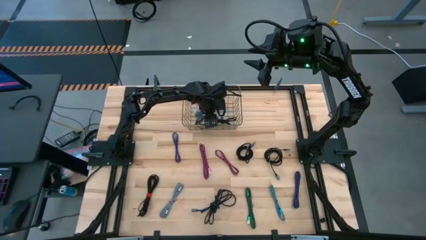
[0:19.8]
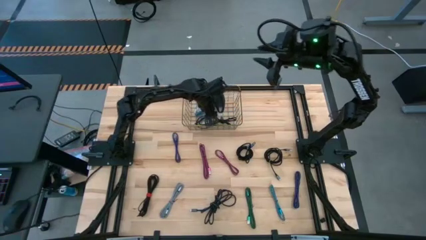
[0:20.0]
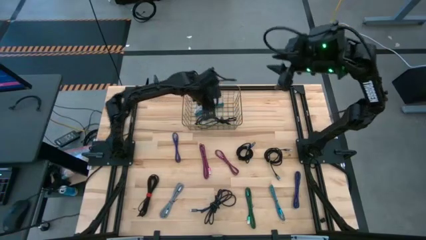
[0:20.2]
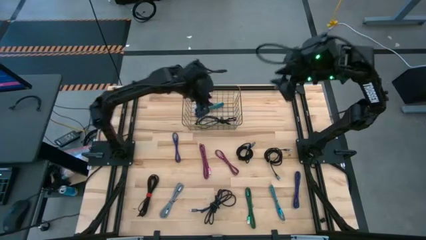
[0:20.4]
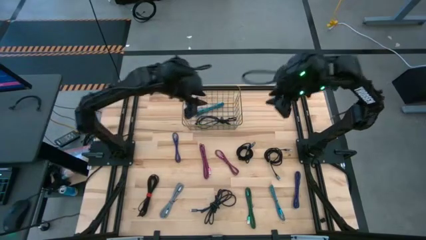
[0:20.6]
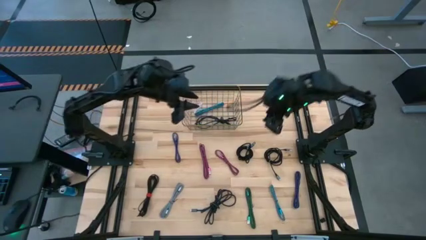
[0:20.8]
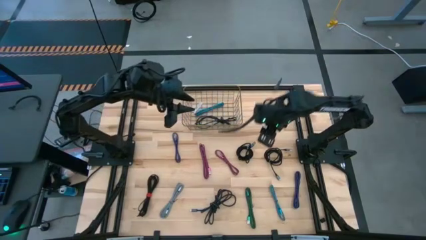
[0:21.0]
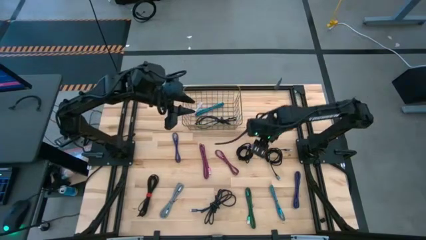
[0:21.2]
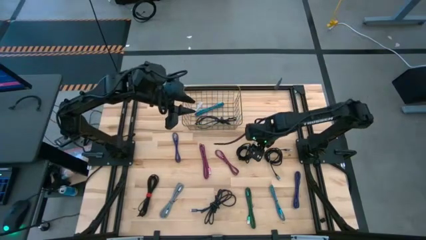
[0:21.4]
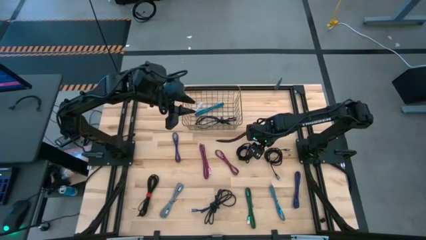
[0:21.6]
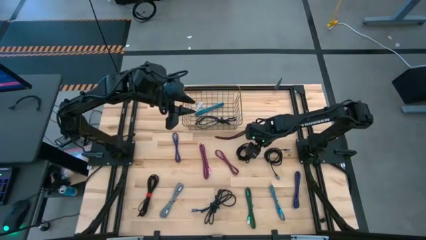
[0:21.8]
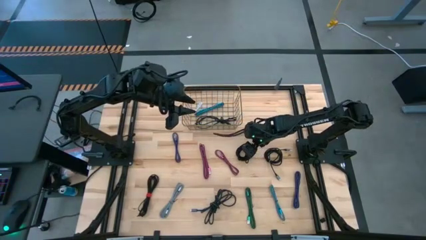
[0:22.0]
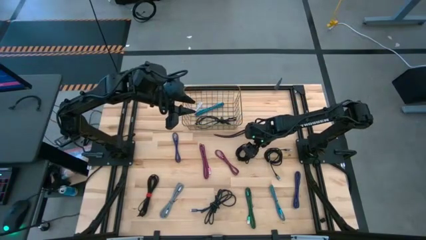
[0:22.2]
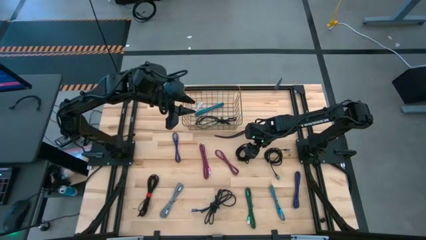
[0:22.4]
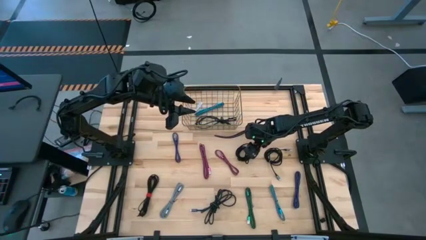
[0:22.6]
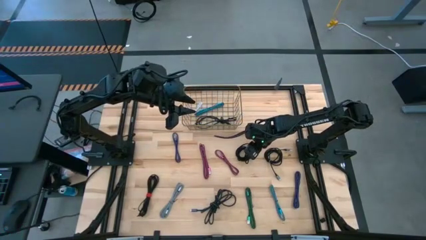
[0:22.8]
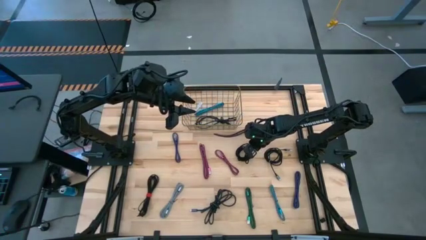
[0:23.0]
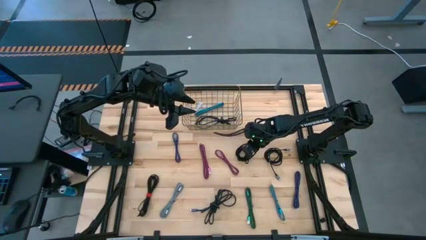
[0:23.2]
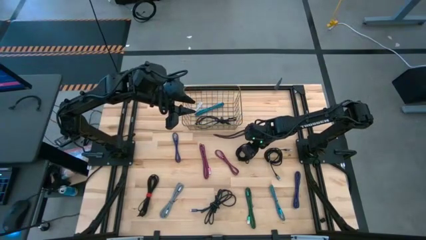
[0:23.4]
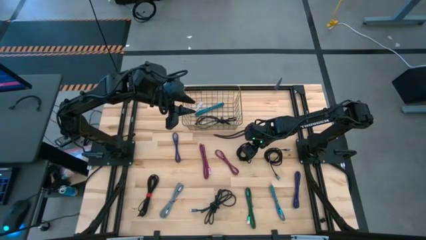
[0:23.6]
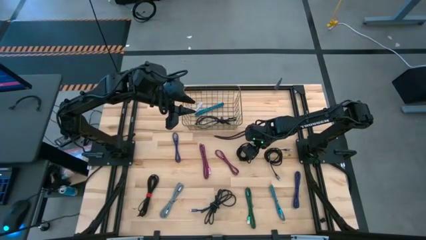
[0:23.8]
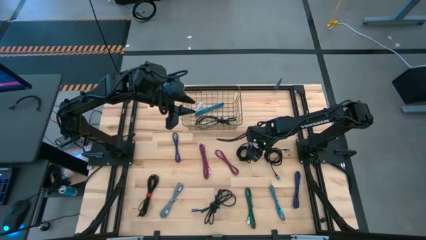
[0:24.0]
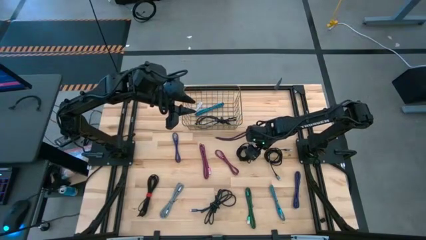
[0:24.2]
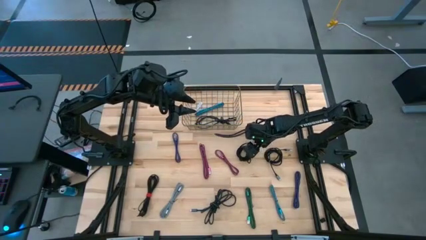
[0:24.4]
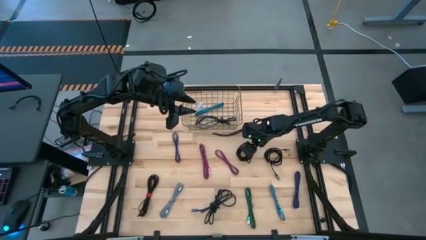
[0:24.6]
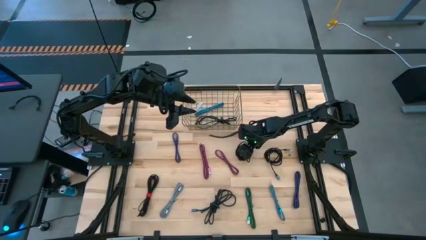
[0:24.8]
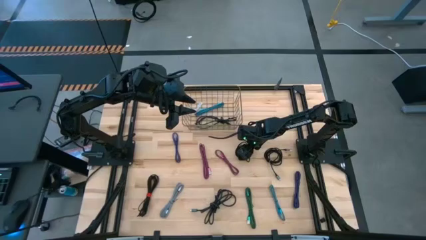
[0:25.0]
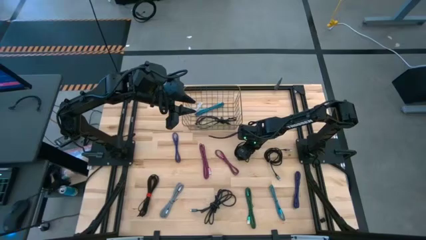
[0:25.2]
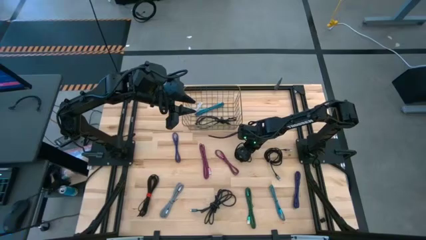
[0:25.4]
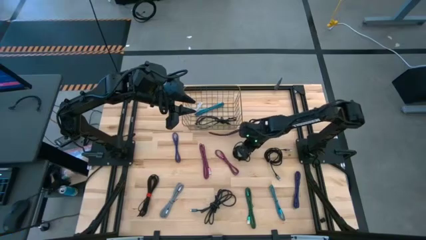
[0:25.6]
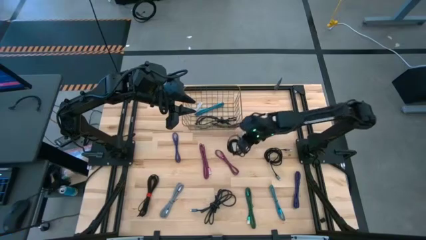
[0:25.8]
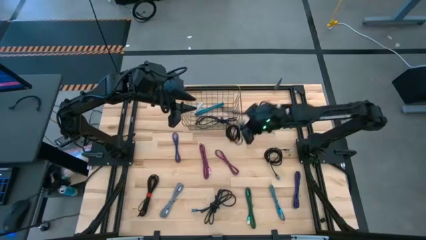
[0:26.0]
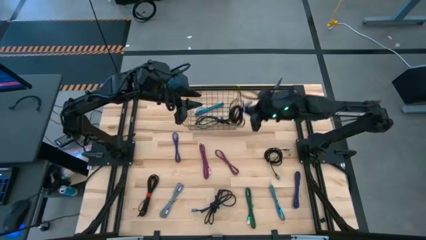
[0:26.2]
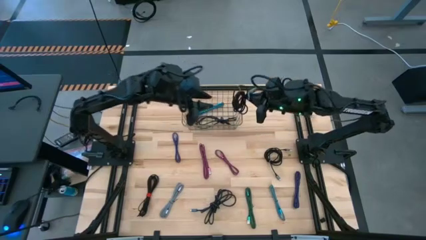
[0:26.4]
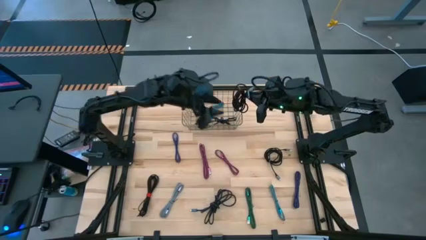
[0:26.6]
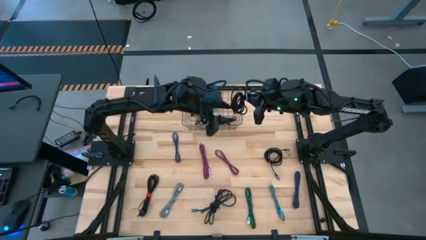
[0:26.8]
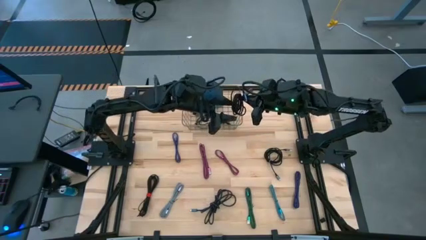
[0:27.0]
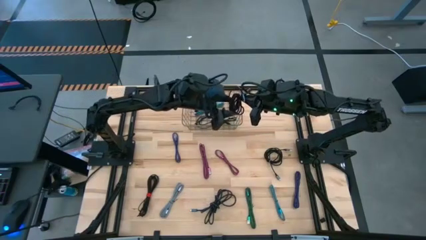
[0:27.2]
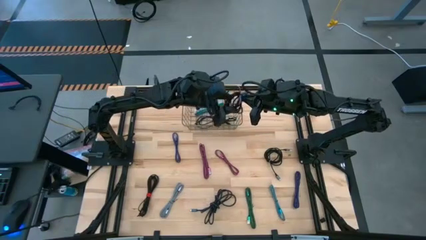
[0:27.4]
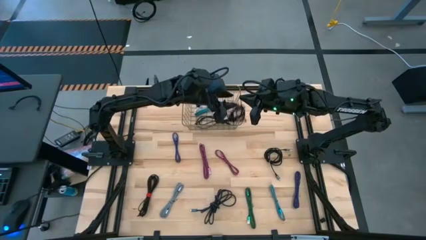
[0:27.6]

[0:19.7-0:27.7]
Task: Pick and place USB-C Cables
Put the black charger cable into the wire basket

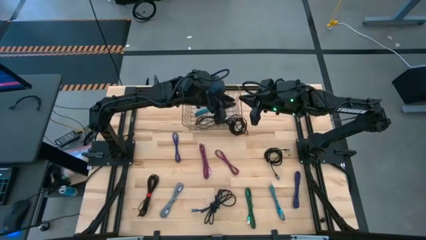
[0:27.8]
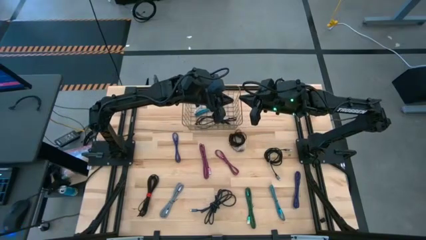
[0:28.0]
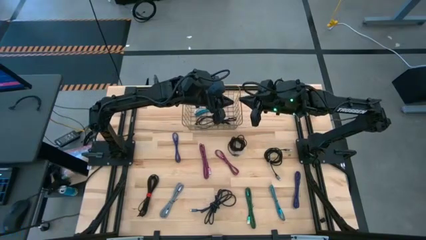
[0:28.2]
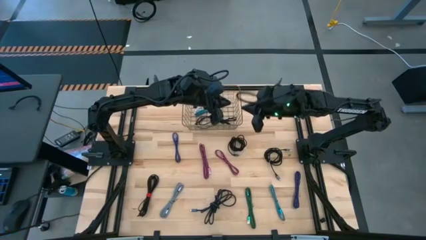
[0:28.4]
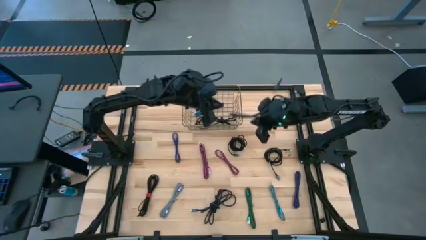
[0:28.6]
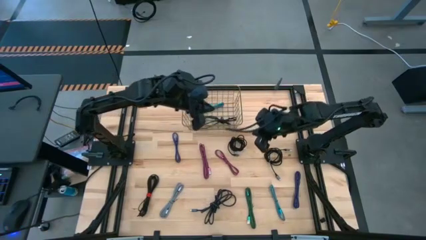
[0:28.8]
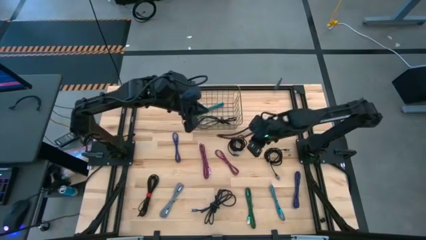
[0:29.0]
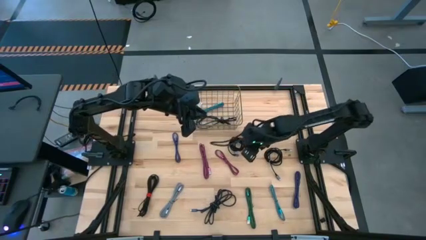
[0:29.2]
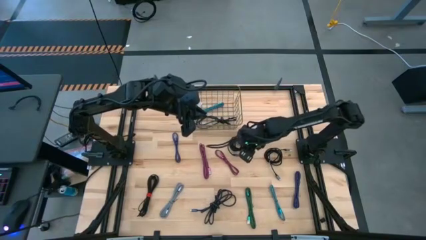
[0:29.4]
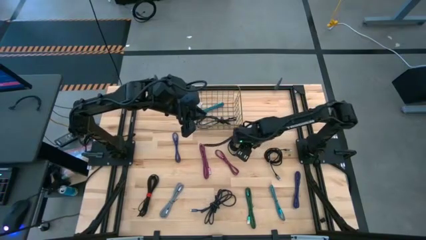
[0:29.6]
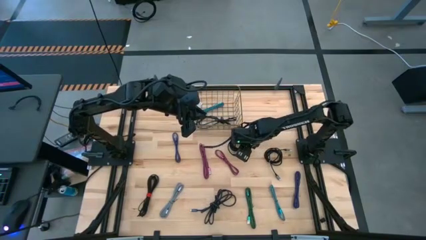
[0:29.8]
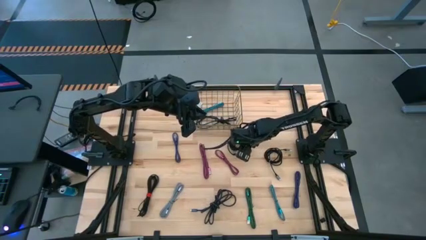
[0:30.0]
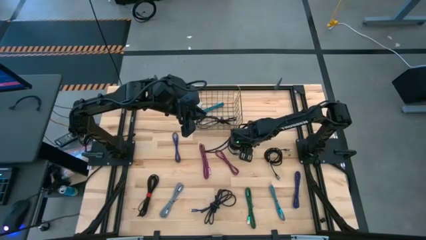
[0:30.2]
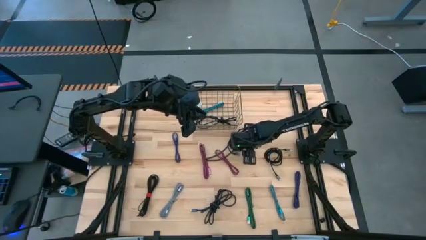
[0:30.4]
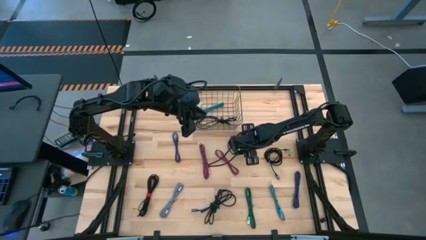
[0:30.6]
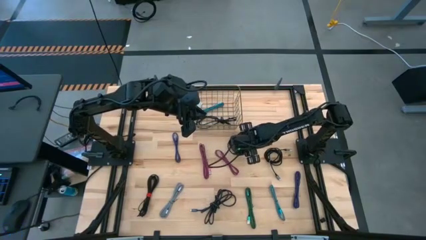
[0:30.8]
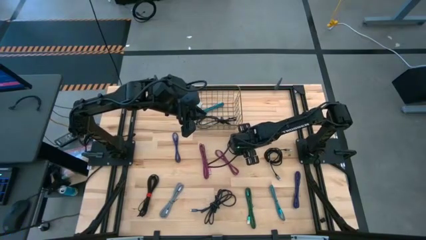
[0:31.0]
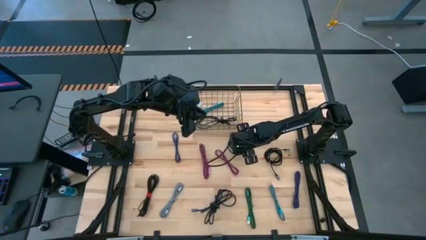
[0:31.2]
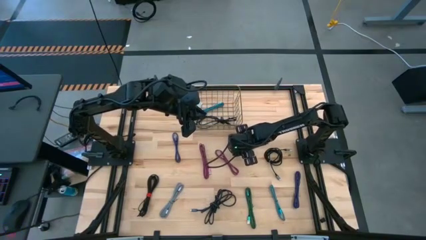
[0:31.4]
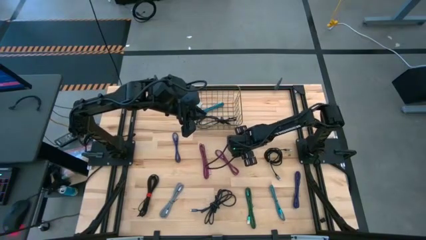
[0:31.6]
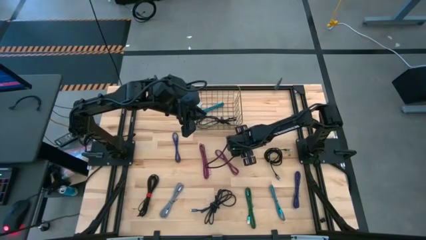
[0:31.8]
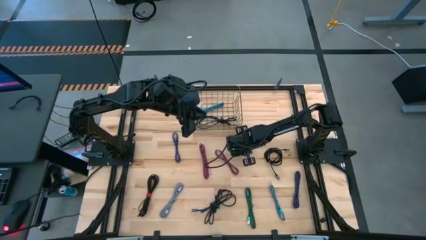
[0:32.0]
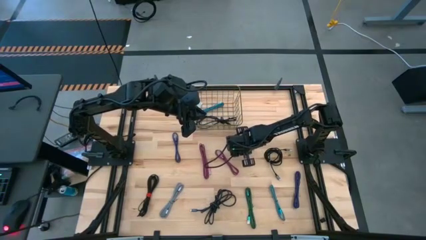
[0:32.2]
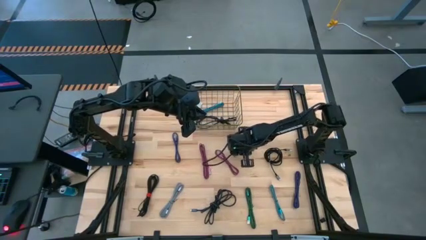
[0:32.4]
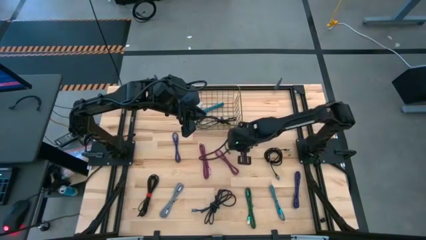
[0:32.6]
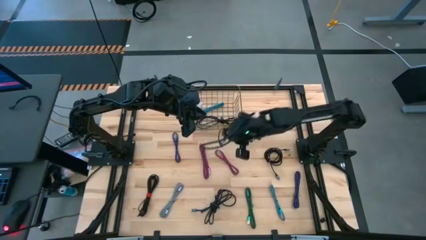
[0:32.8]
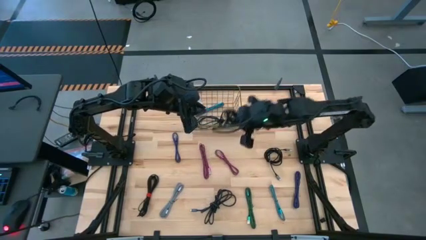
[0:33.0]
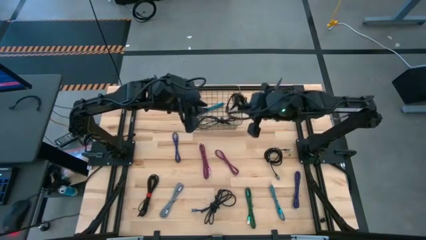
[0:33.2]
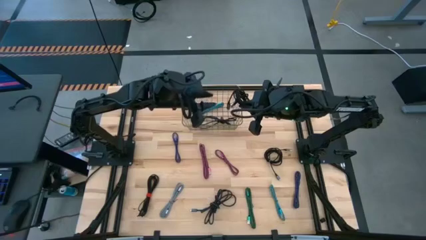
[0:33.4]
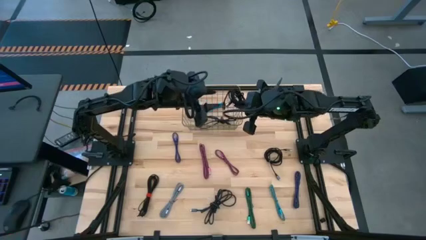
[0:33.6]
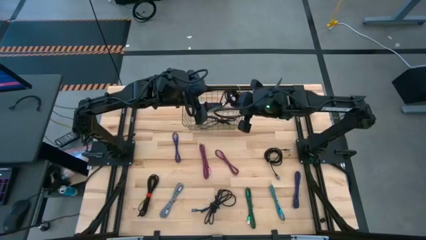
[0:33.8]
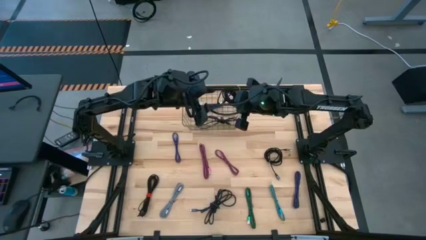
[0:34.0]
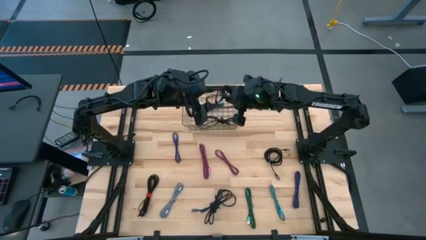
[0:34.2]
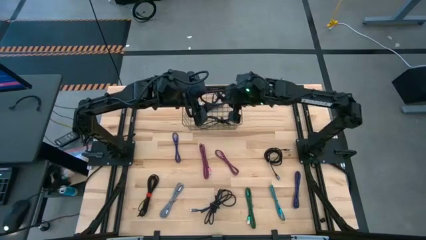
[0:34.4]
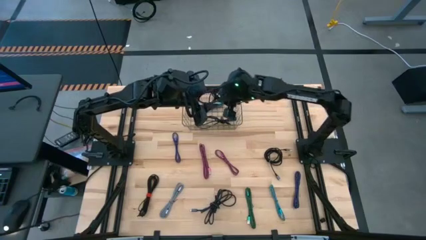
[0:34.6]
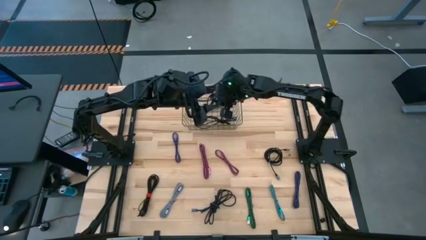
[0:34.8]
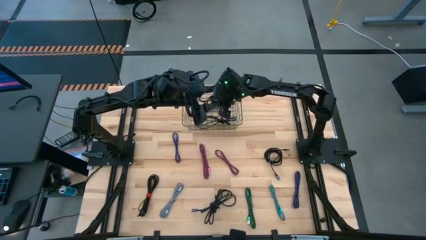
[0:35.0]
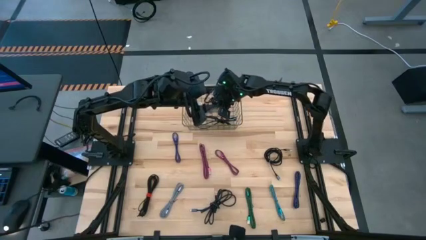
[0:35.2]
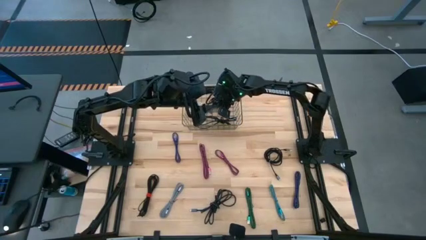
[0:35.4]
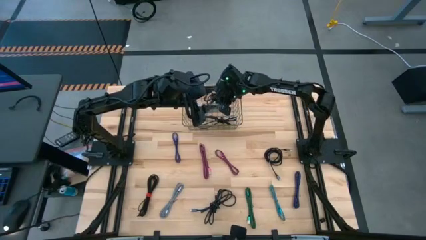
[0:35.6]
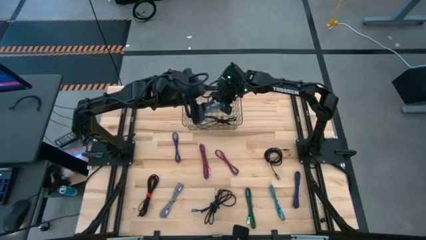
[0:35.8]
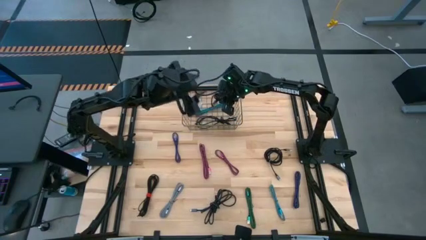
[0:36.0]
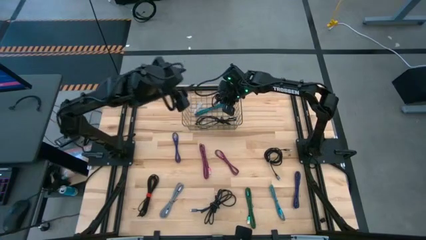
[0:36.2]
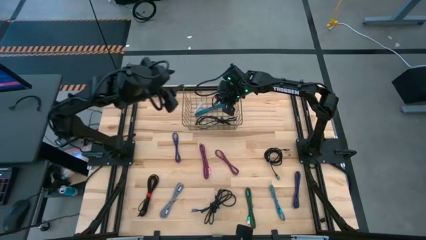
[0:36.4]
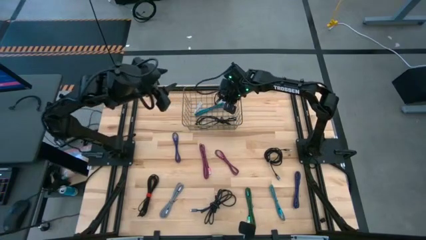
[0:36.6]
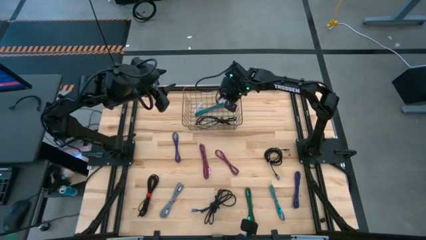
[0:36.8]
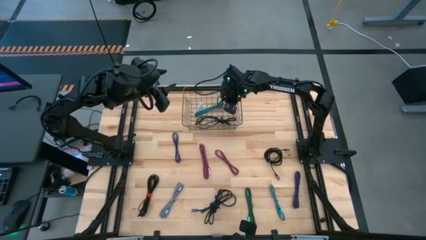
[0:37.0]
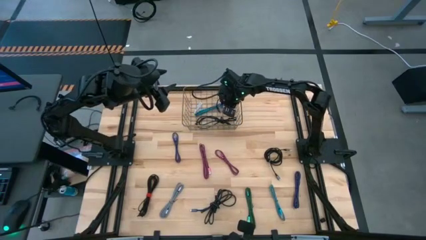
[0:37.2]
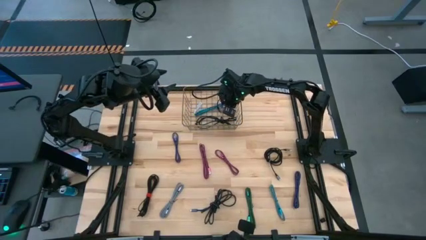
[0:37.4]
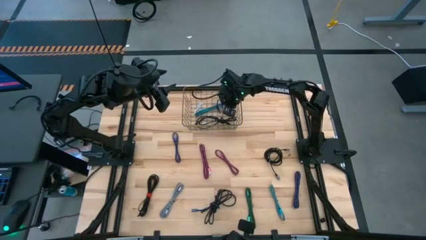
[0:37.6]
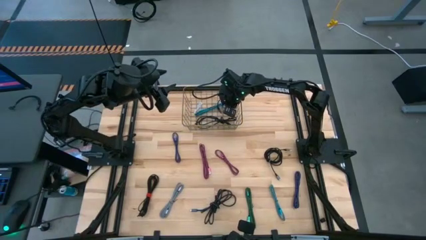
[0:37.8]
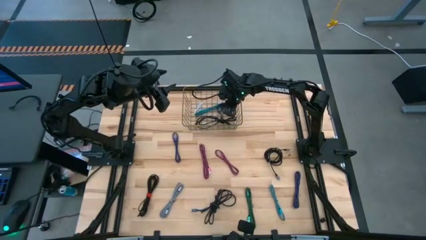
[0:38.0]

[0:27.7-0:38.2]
Put the black charger cable into the wire basket
